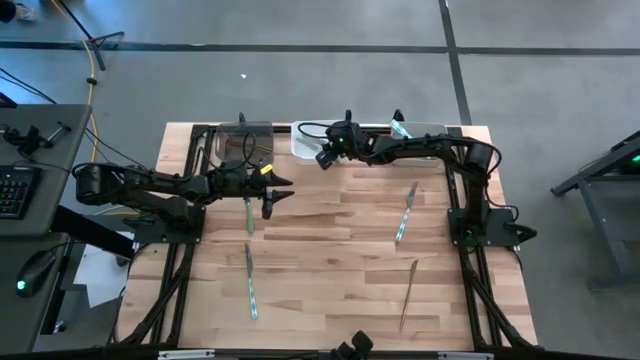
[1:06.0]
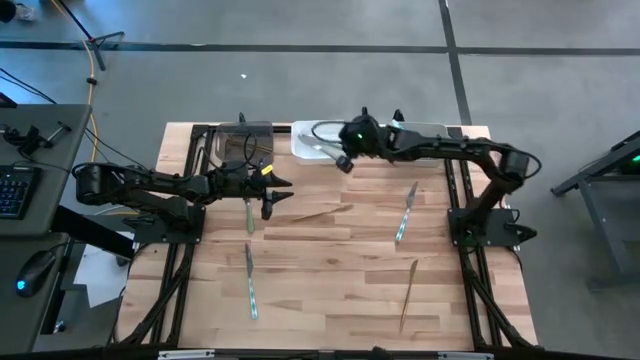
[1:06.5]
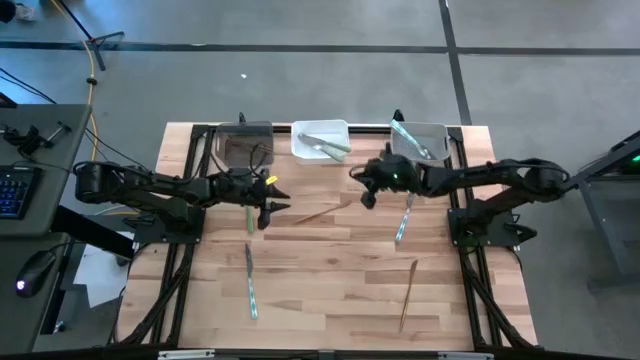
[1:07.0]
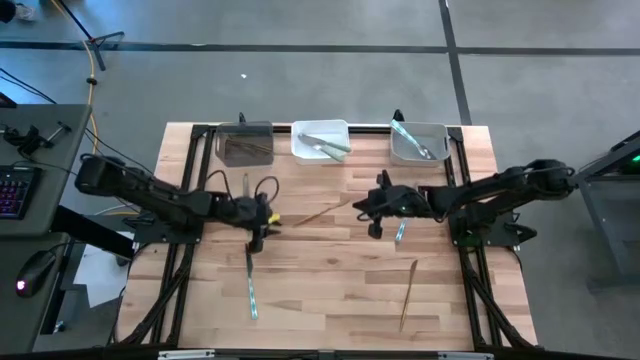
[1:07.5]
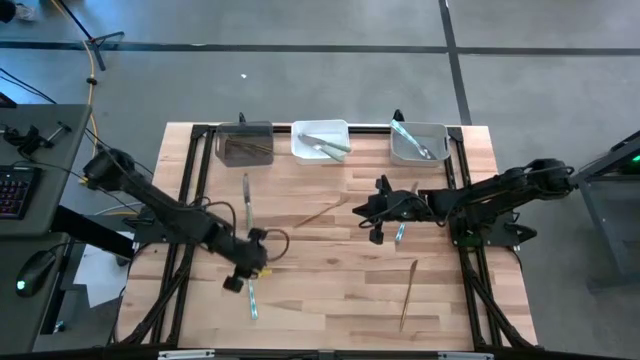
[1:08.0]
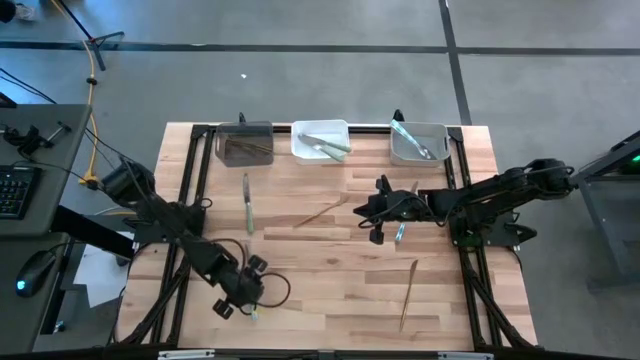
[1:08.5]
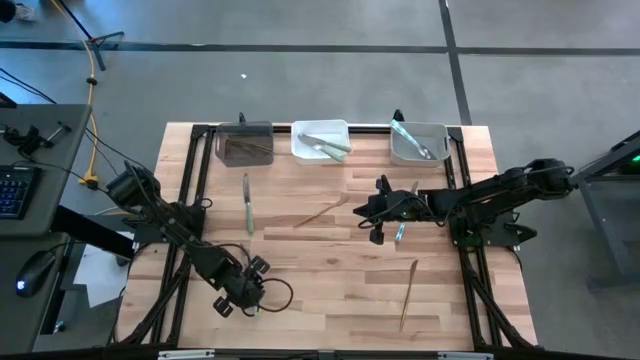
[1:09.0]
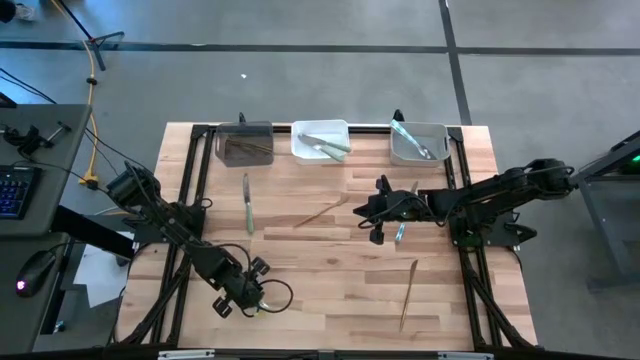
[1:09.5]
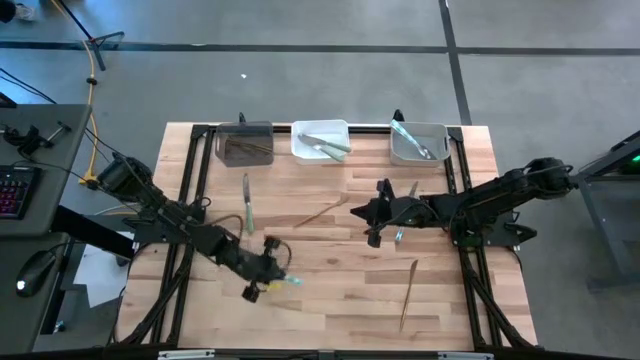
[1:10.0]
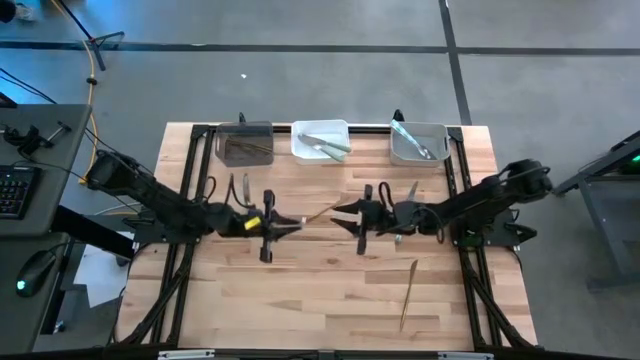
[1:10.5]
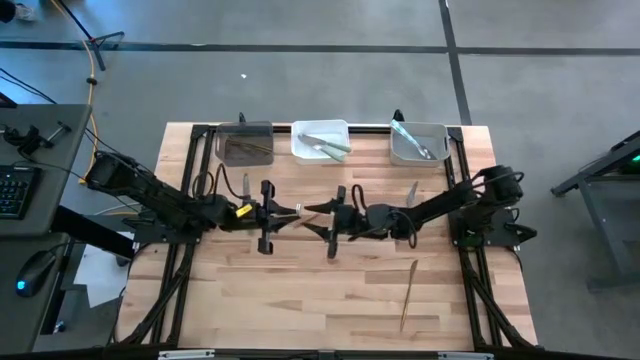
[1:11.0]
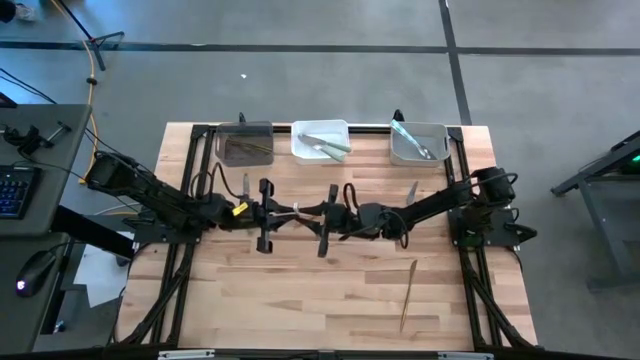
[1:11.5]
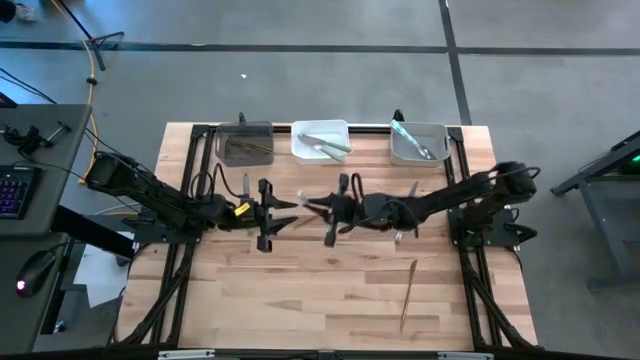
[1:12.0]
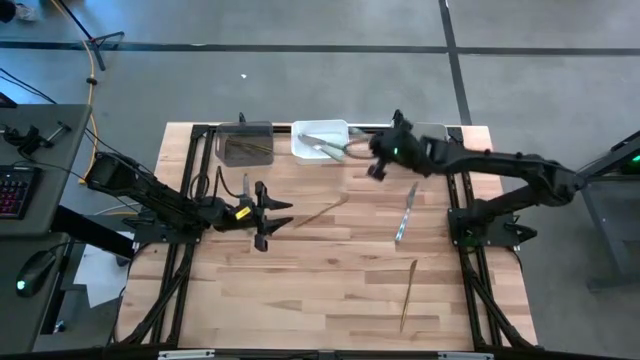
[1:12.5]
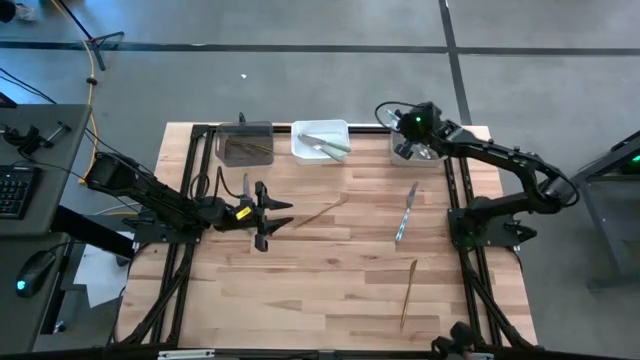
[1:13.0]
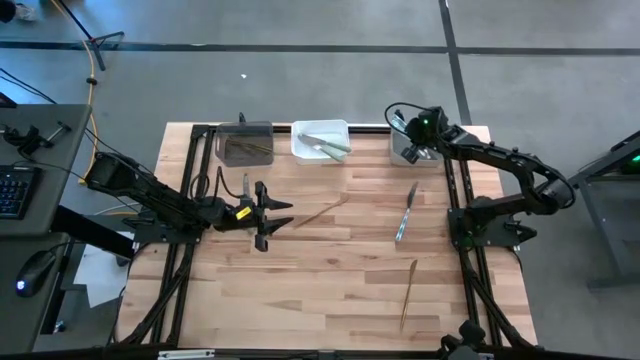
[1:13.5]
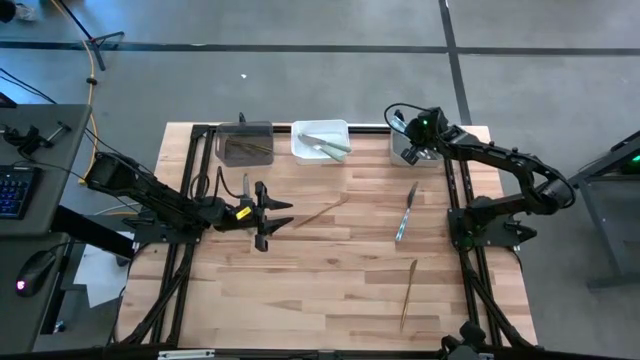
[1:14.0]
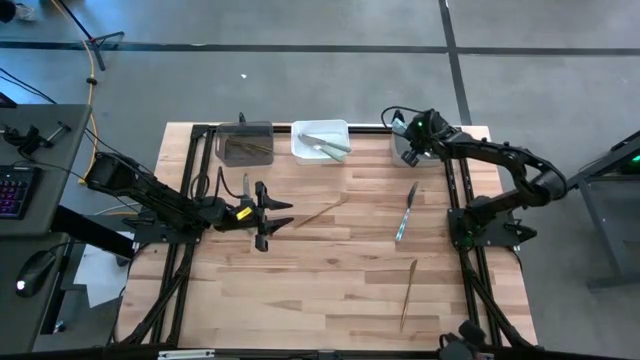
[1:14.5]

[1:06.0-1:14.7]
Task: Sort silverware by color (type)
Put the blue patterned knife into the gray bin

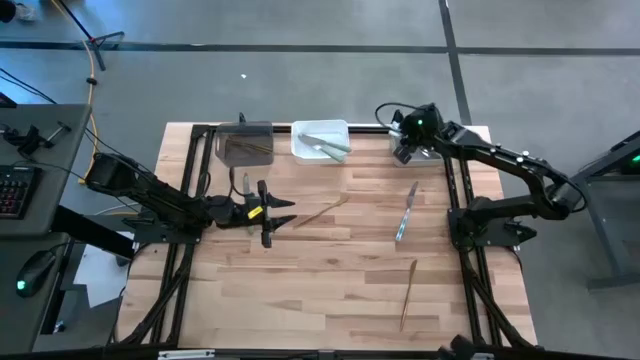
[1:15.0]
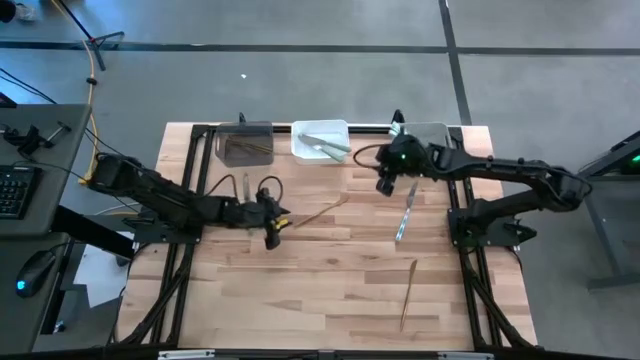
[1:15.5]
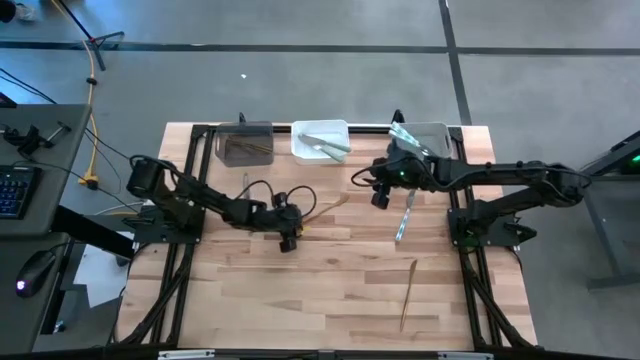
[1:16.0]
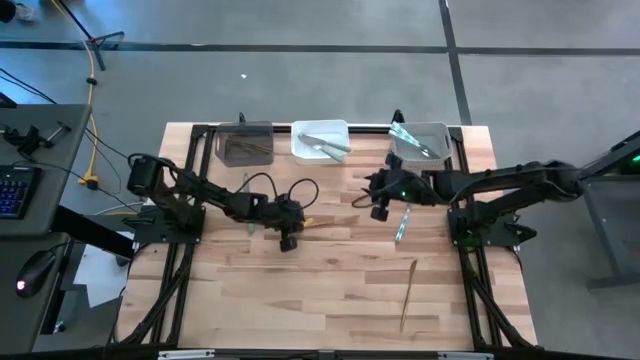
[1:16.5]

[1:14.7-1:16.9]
Put the gold knife into black bin

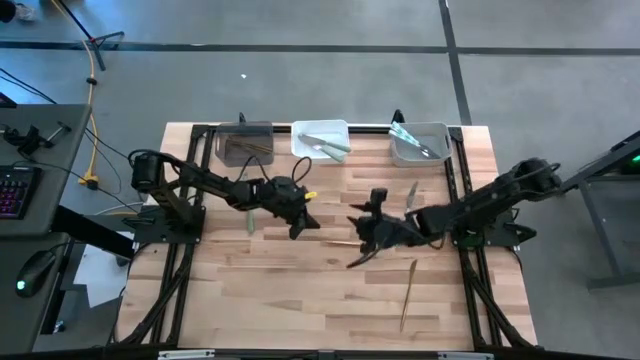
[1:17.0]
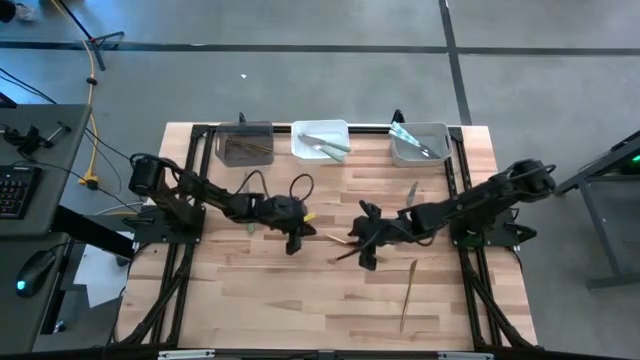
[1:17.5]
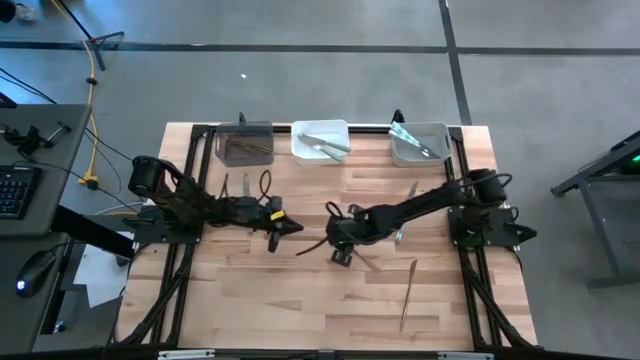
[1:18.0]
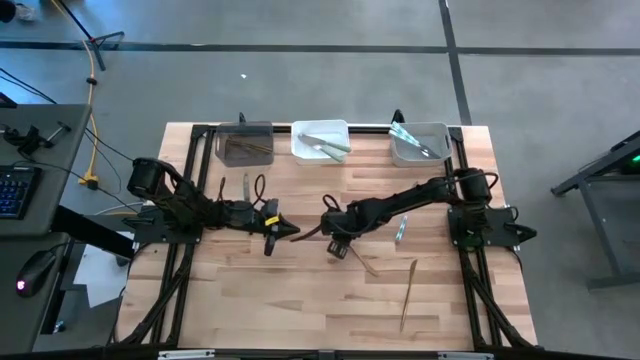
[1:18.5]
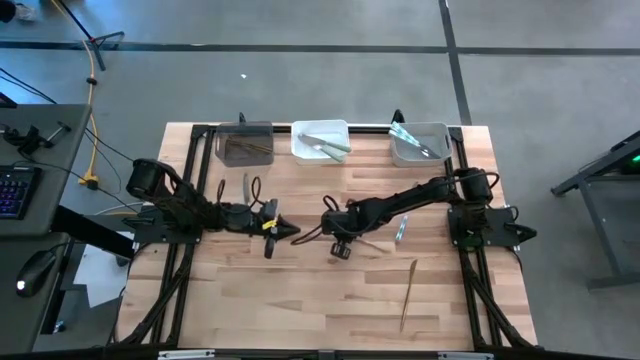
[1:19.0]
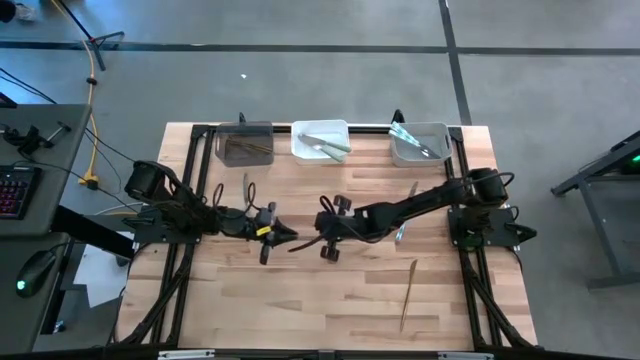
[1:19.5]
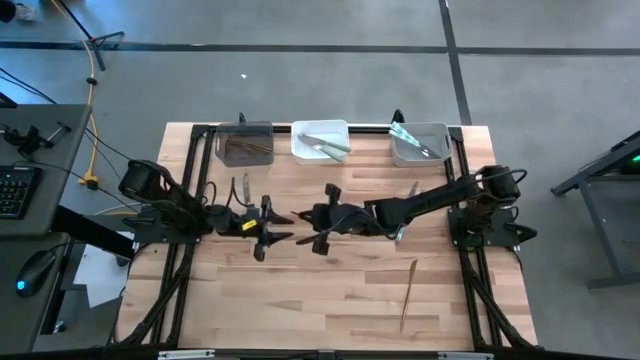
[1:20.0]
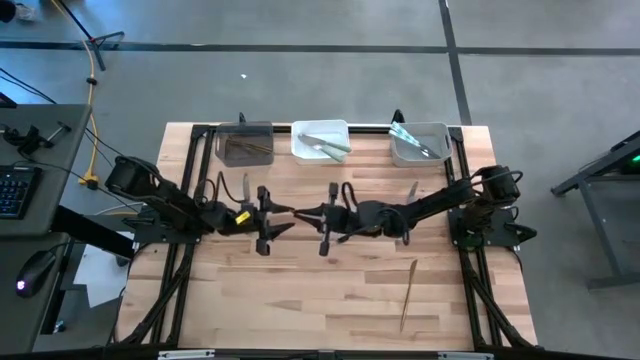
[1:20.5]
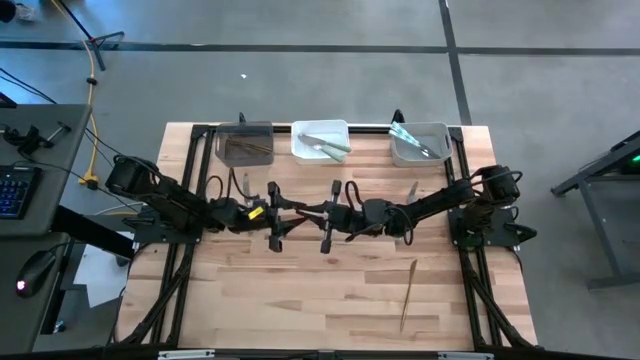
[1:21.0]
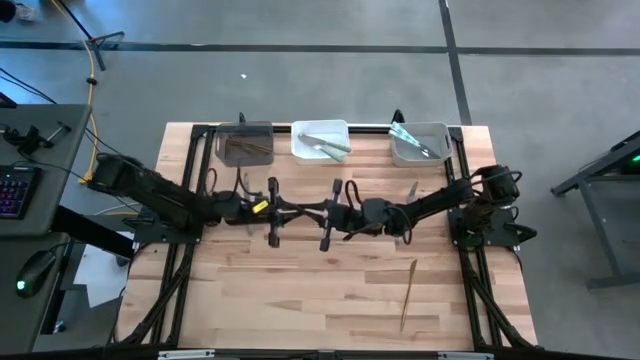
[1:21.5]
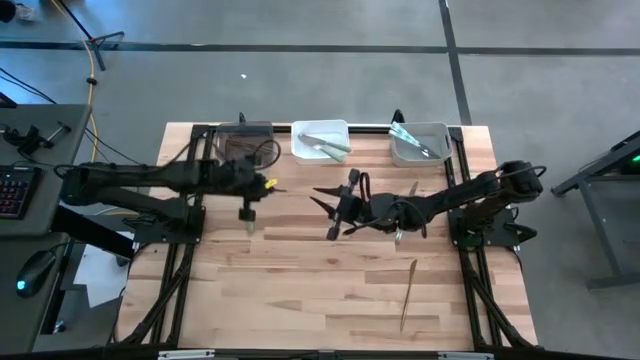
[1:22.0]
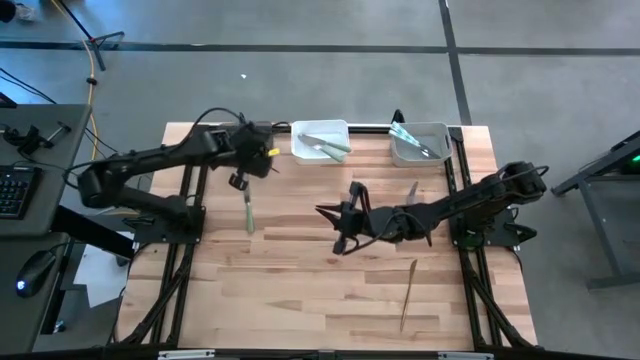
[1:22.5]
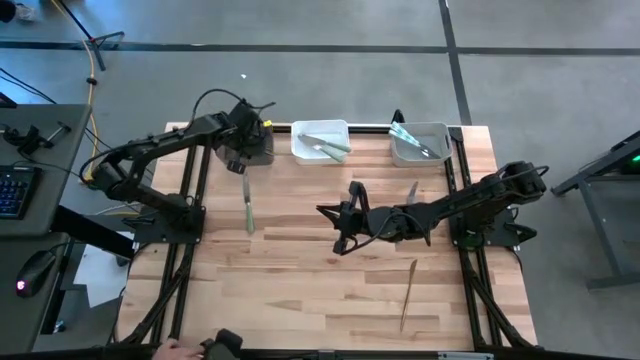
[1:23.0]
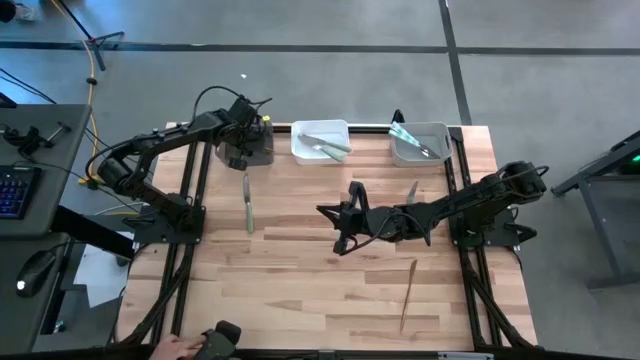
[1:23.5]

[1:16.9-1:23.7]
Put the gold knife into black bin

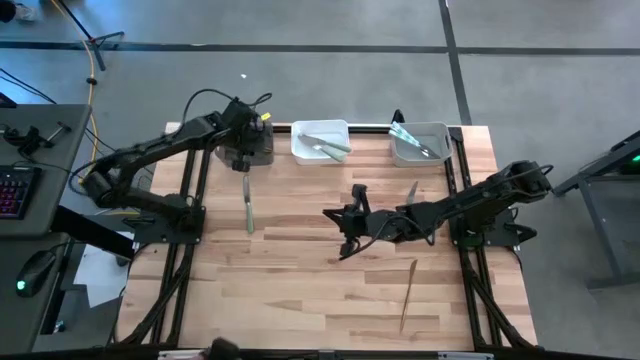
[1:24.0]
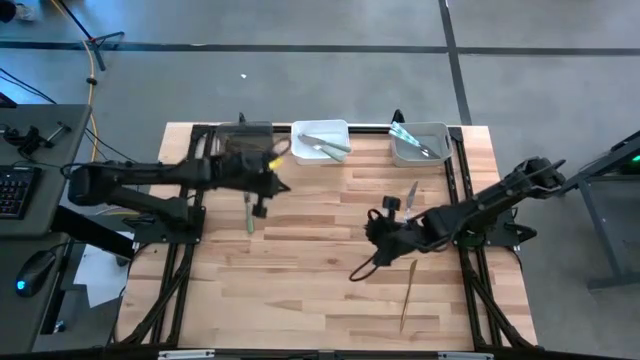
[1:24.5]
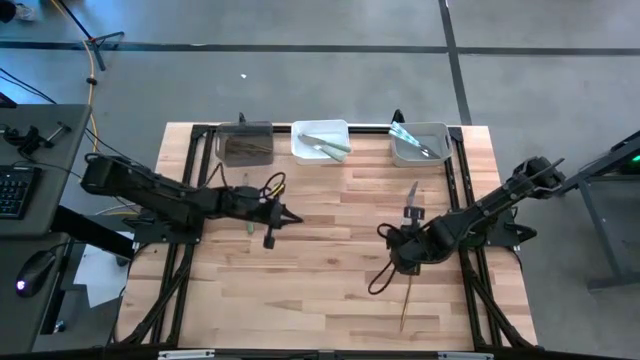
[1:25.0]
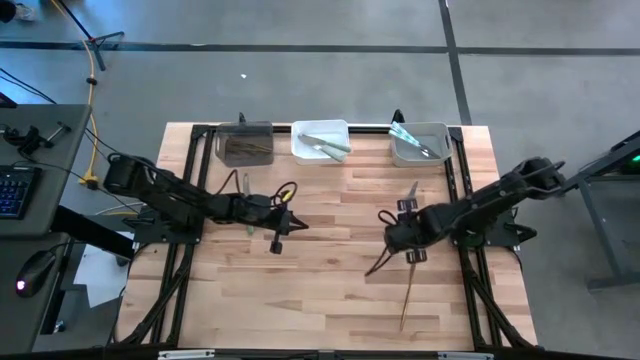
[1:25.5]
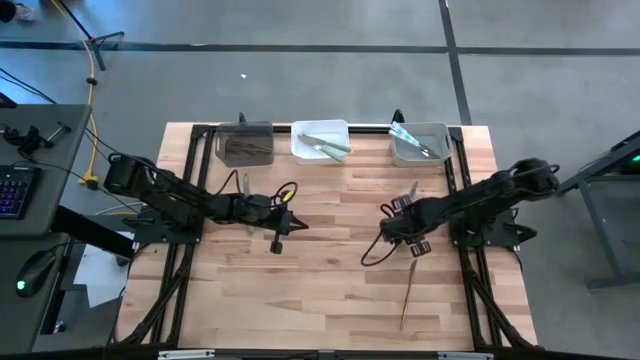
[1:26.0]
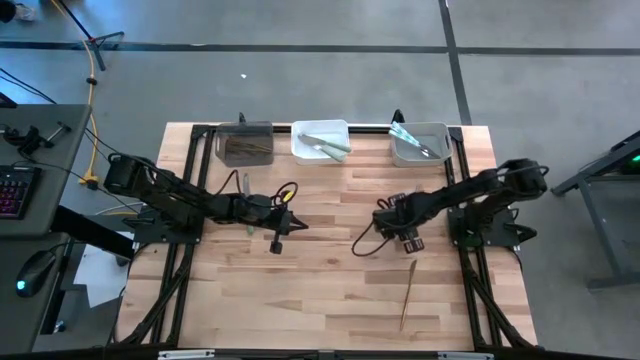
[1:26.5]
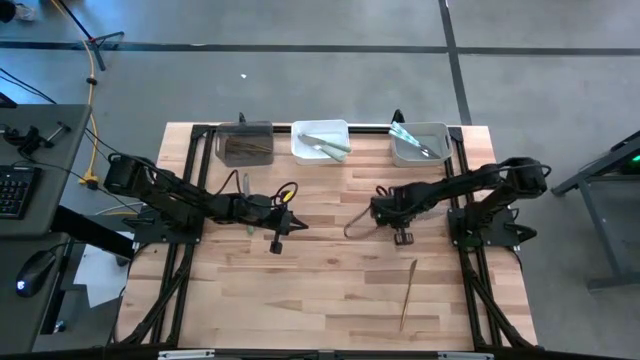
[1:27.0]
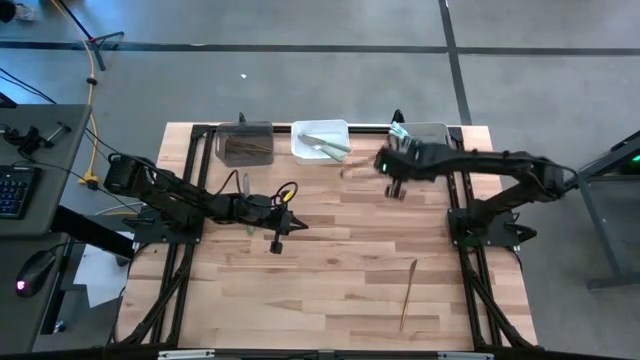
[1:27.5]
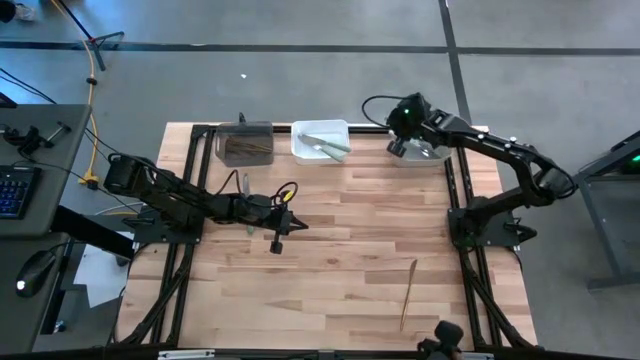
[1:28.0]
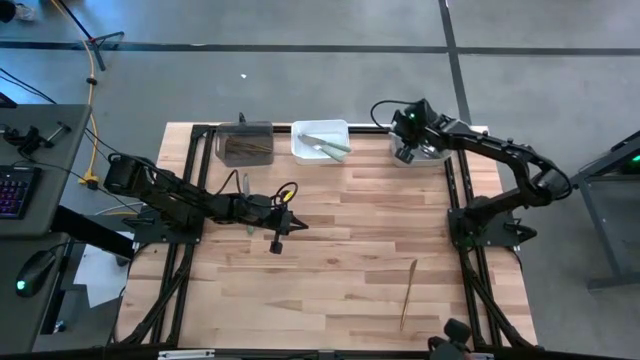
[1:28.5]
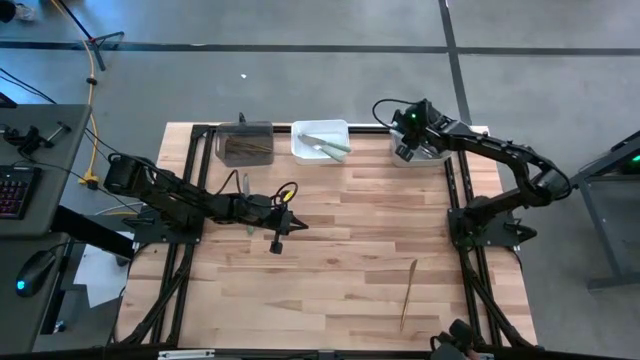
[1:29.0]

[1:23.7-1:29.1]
Put the blue patterned knife into the gray bin
